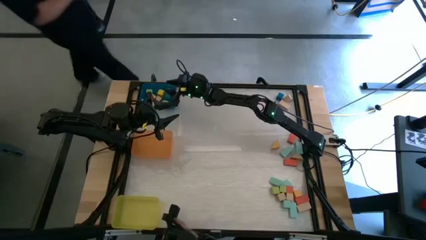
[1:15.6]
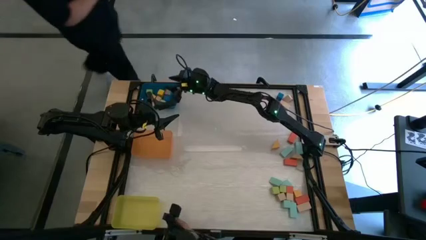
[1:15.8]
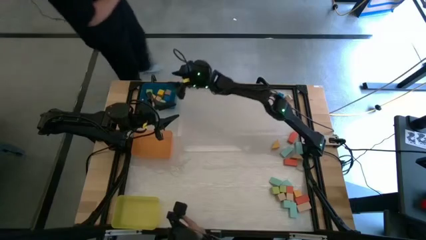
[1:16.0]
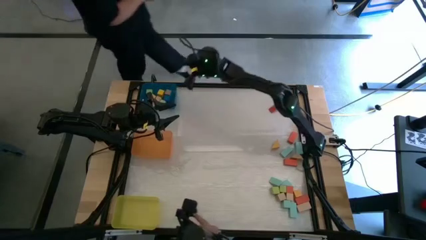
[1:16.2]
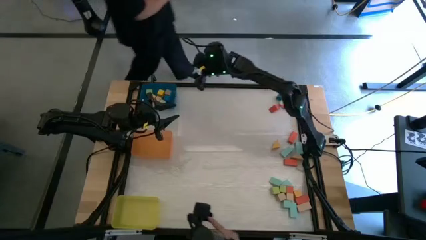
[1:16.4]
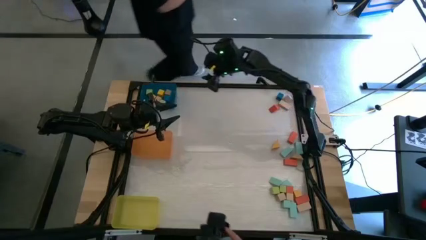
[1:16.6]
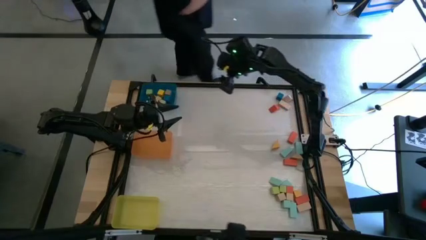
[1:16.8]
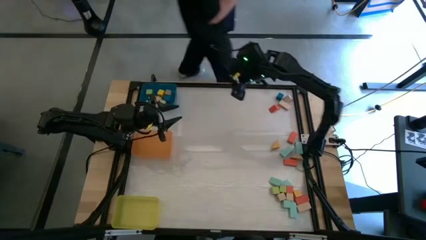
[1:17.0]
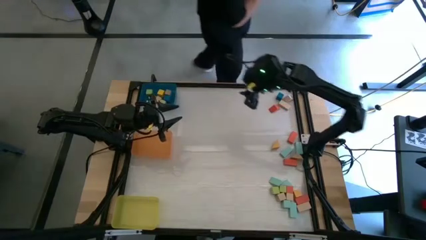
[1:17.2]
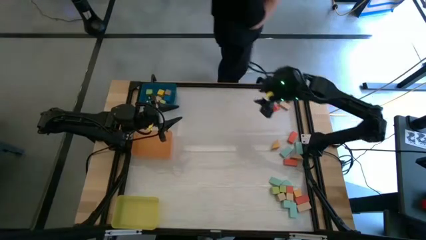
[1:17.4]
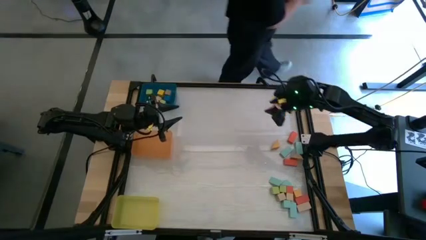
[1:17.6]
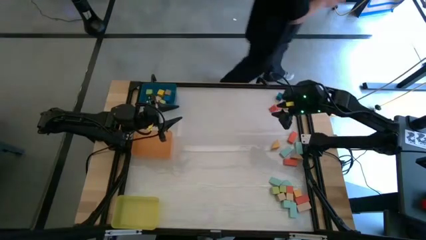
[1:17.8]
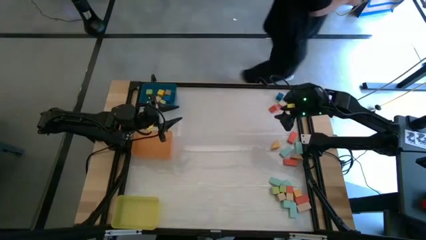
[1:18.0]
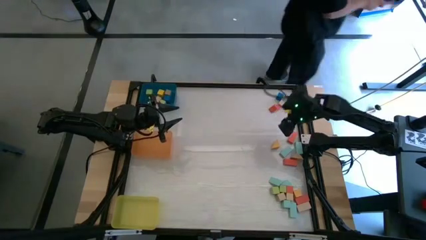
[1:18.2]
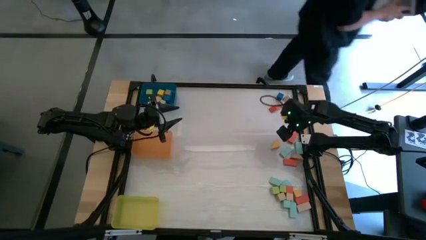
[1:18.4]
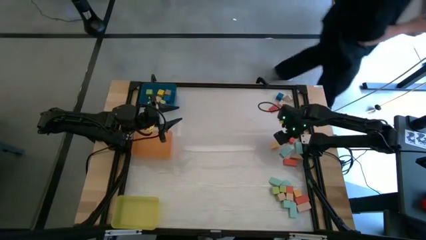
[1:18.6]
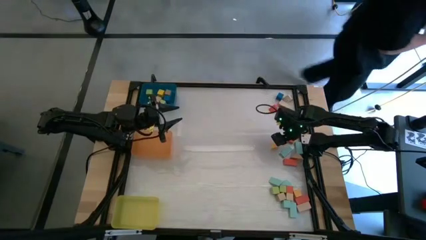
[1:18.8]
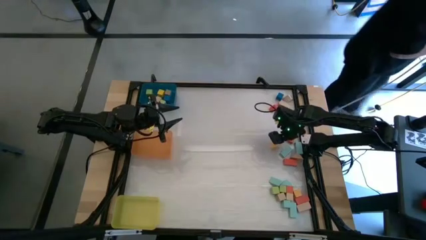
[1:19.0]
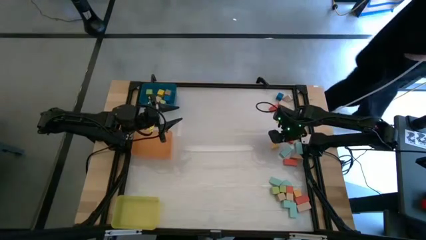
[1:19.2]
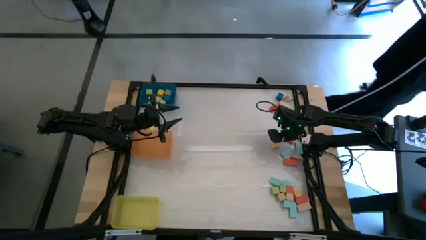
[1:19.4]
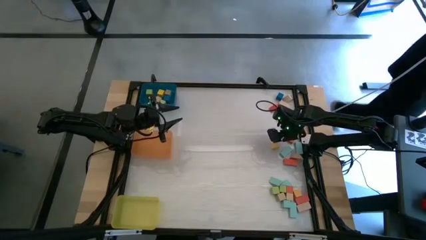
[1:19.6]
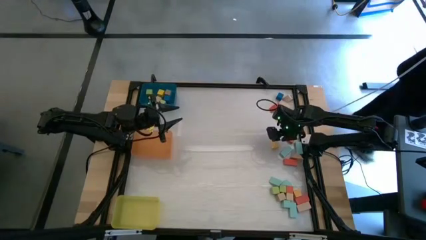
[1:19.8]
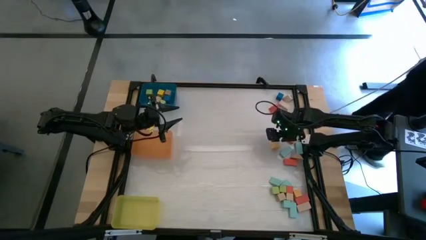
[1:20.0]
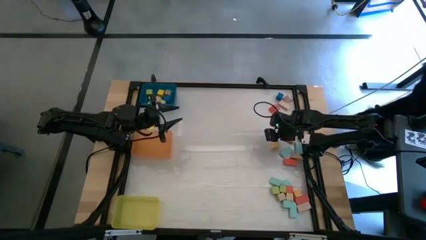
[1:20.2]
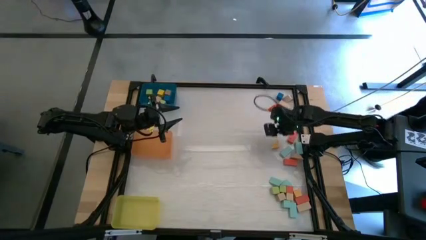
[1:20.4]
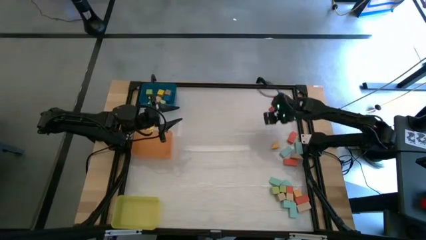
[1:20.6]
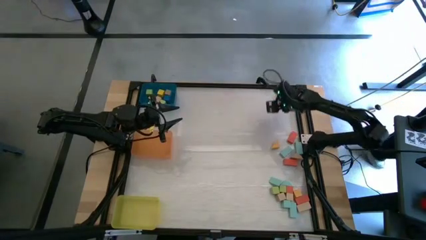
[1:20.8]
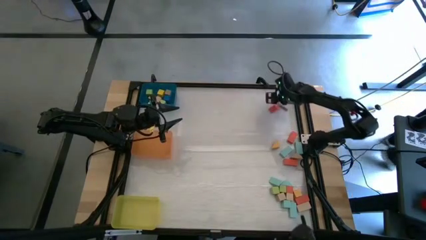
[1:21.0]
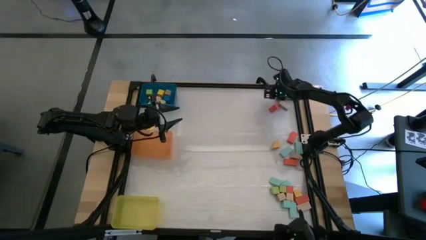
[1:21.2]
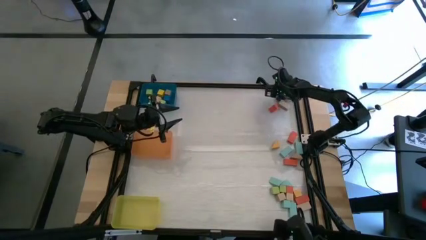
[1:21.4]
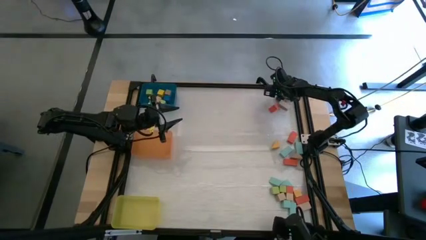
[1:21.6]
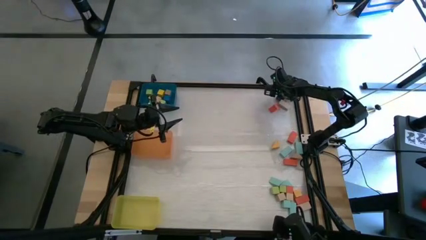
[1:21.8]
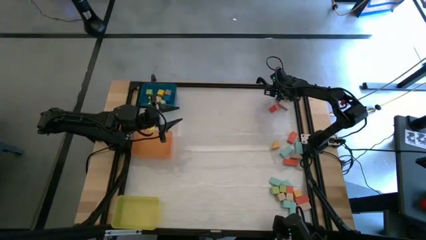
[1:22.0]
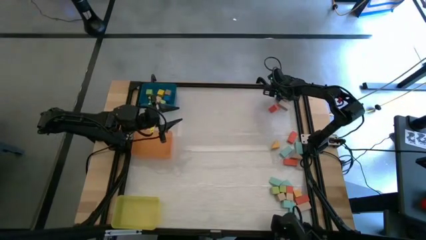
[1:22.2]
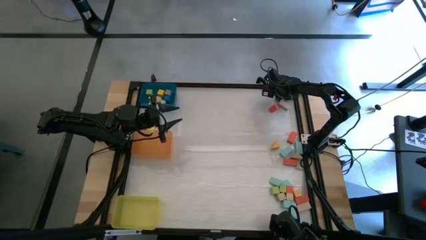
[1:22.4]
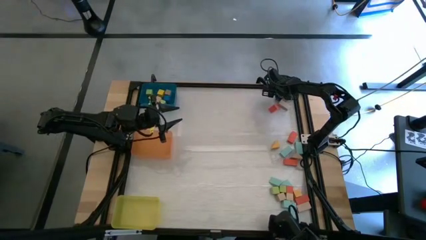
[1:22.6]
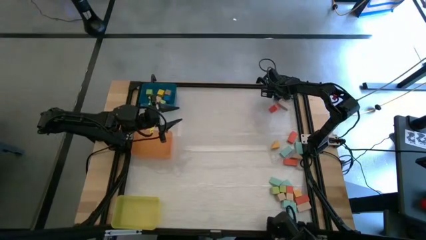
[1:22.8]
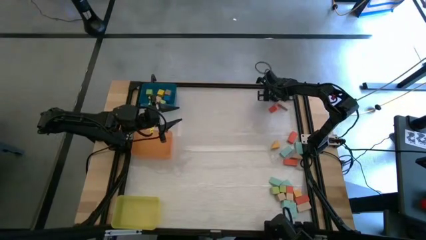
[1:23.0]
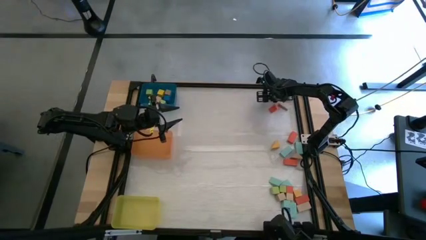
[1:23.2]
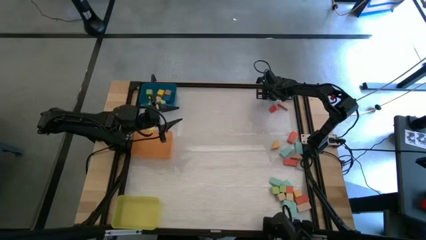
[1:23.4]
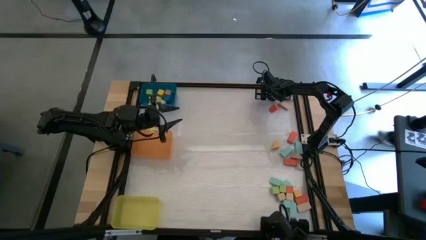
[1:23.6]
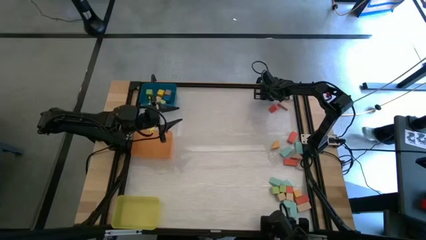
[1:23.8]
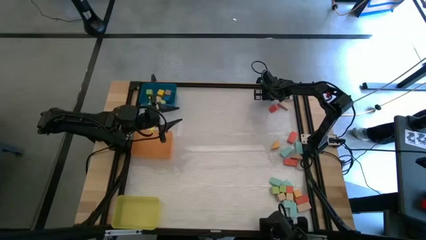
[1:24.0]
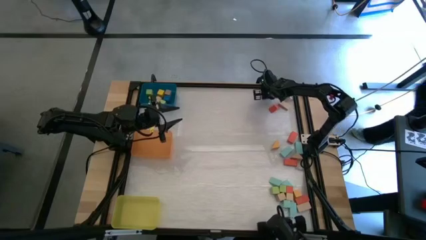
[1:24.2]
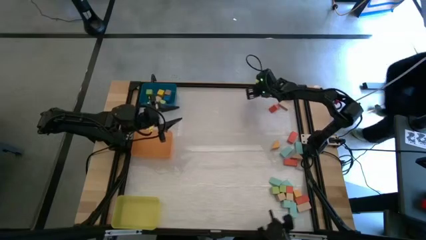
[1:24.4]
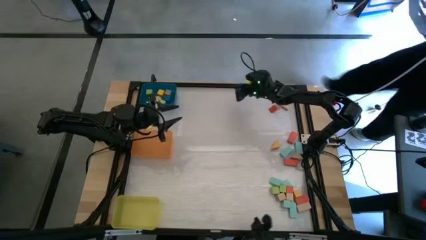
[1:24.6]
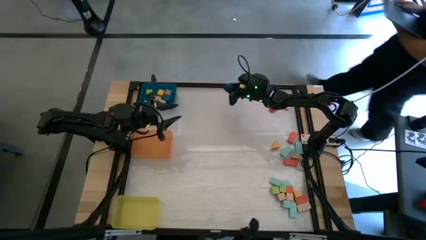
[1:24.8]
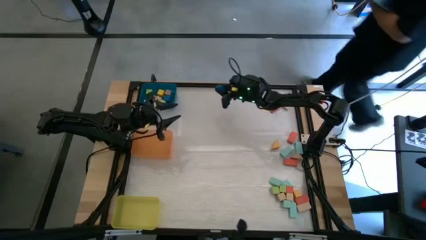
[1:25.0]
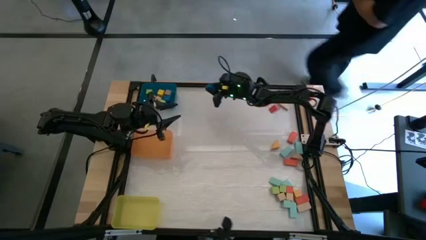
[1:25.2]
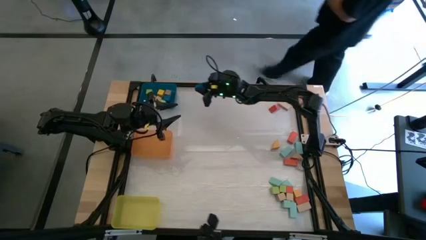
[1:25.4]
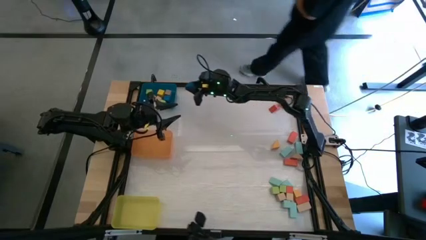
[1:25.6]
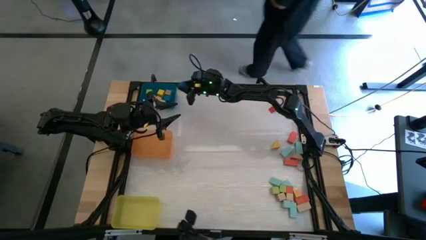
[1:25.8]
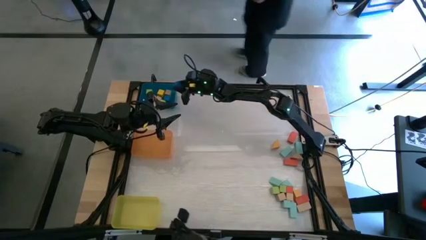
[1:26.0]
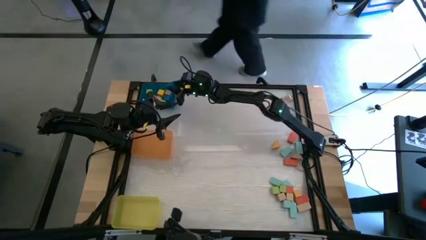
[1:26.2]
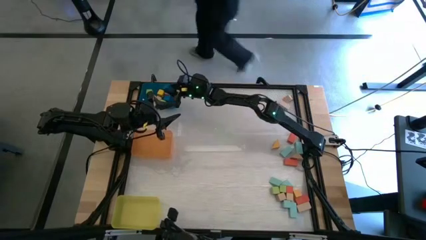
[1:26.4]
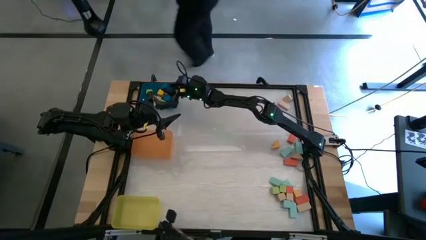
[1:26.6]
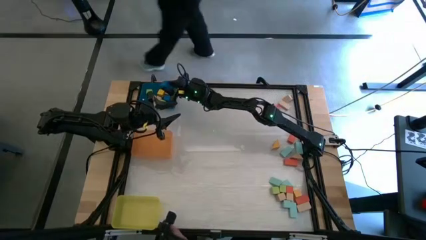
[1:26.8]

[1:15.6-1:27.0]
Task: Sort blocks by size
Put the blue cube block into the blue bin

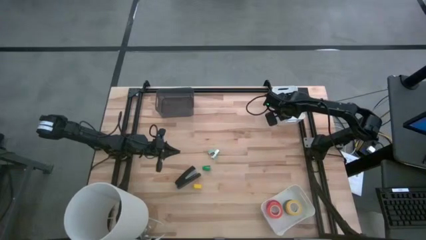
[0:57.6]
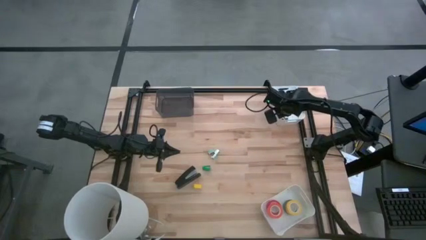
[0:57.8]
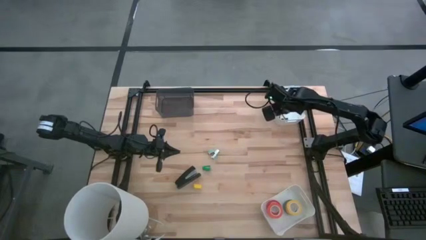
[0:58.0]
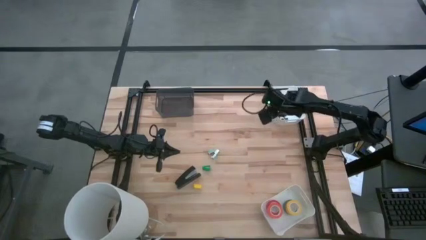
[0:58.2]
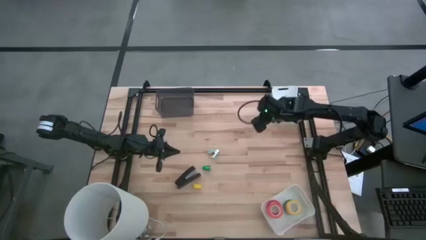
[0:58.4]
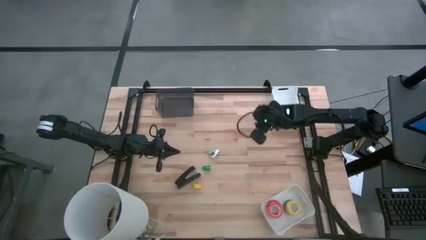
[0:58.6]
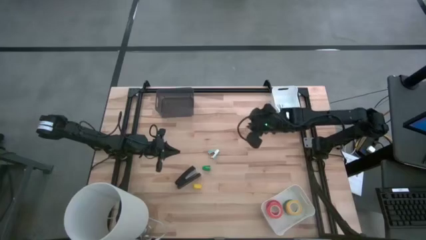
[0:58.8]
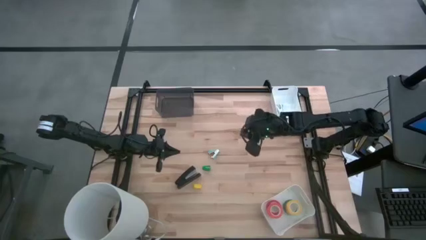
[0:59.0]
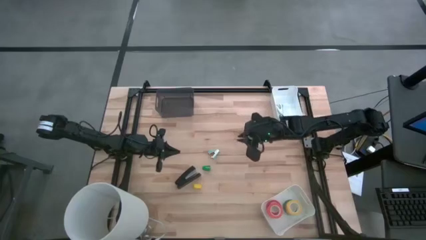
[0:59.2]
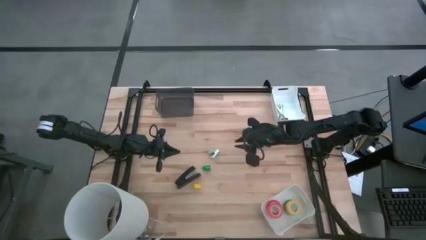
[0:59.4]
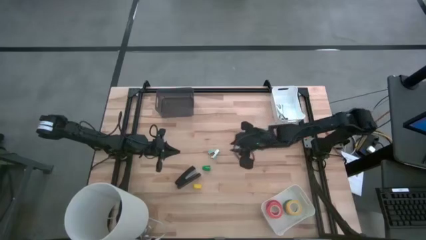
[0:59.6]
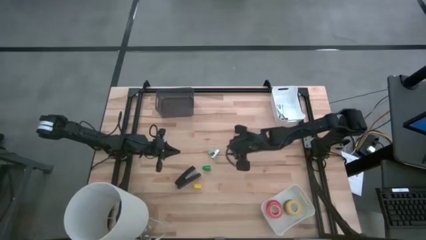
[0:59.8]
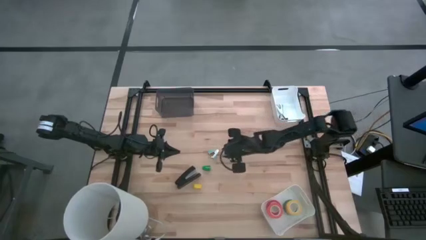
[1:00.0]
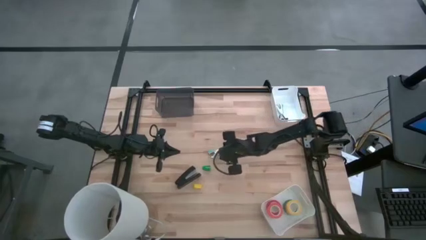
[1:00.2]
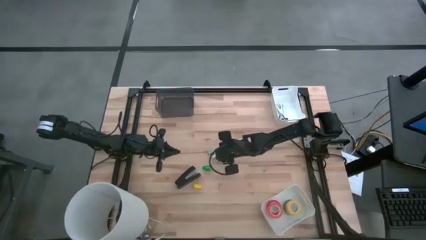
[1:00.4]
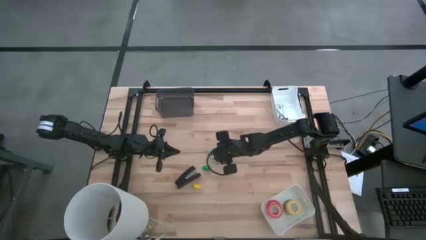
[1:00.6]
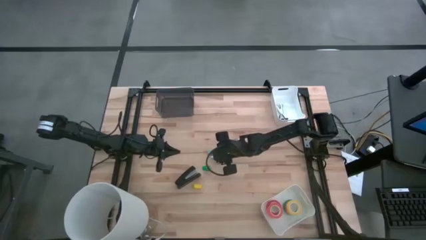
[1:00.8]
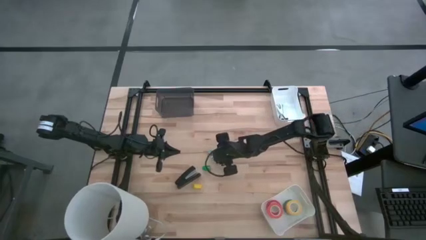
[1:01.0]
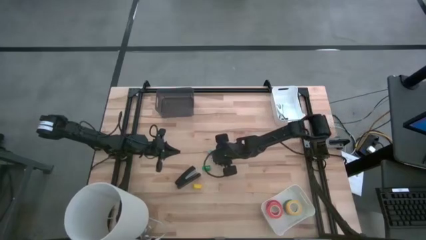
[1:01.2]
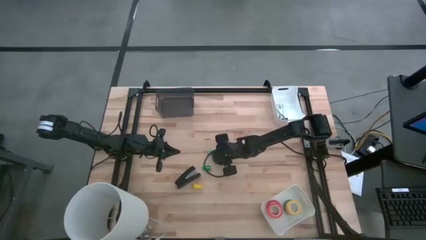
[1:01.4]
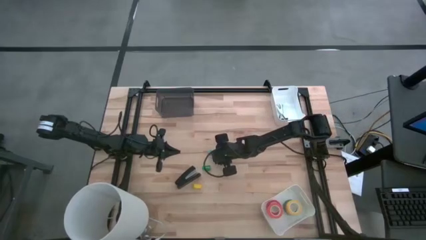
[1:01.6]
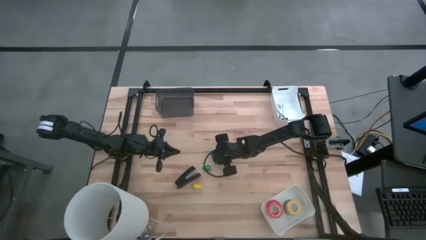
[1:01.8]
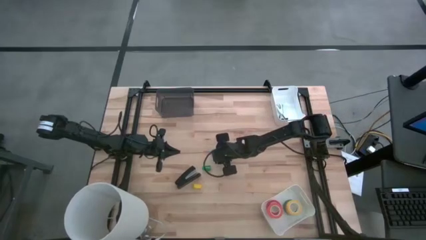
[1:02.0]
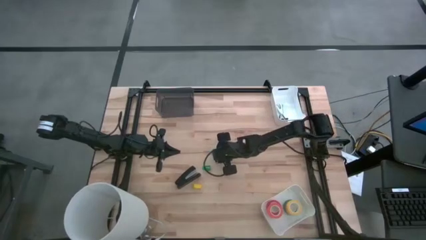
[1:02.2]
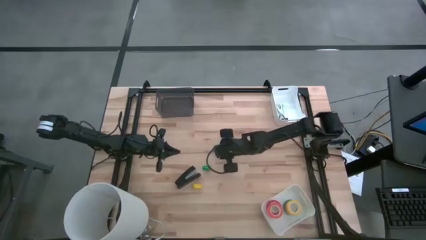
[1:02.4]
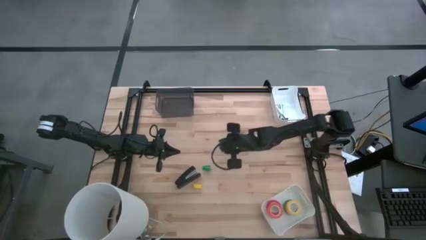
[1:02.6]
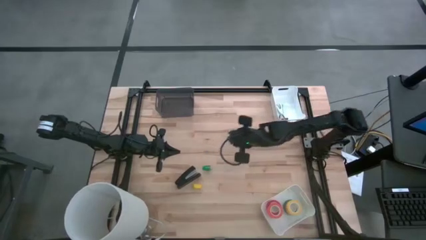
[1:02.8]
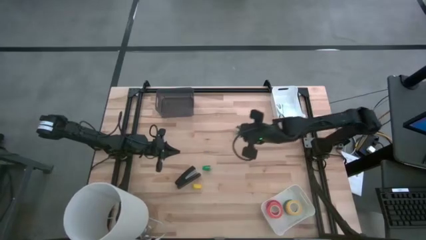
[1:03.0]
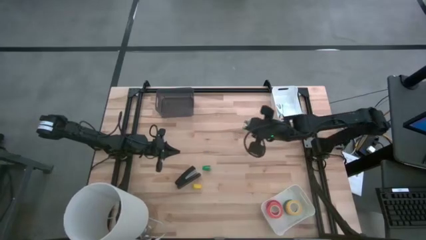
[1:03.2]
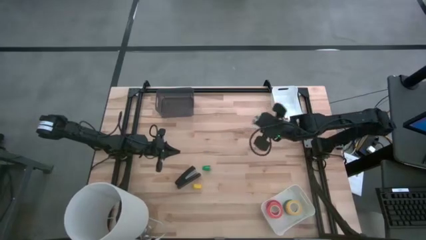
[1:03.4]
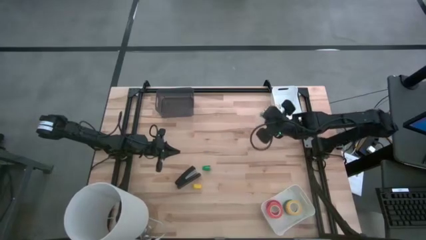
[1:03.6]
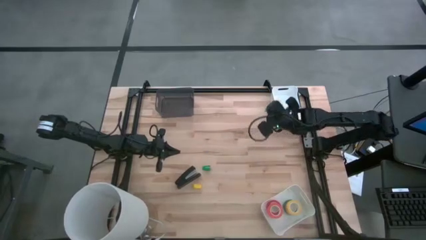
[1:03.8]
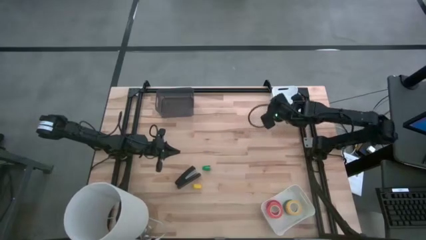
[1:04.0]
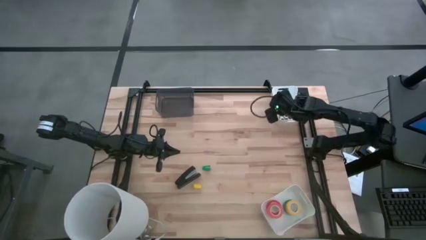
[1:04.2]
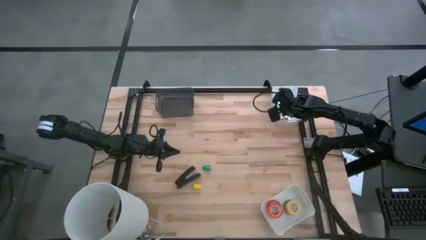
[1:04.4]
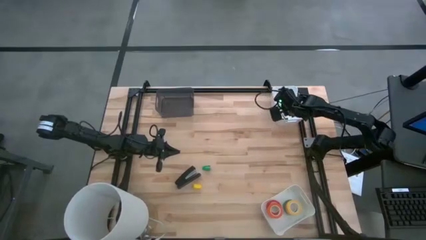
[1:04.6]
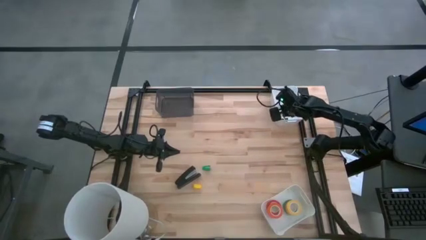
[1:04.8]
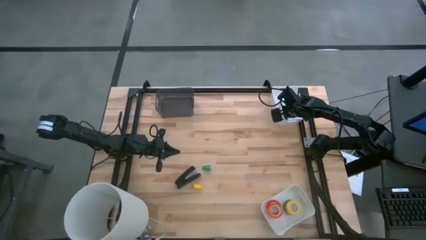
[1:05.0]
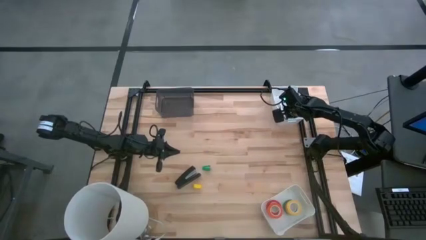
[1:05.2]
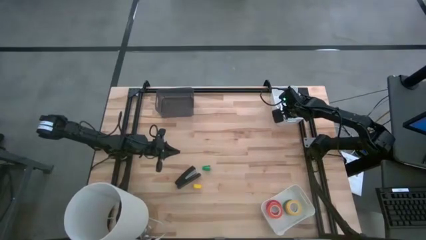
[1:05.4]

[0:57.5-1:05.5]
Task: Pick and place Stapler, Stapler remover, tape
Put the light blue staple remover into the top white bin
